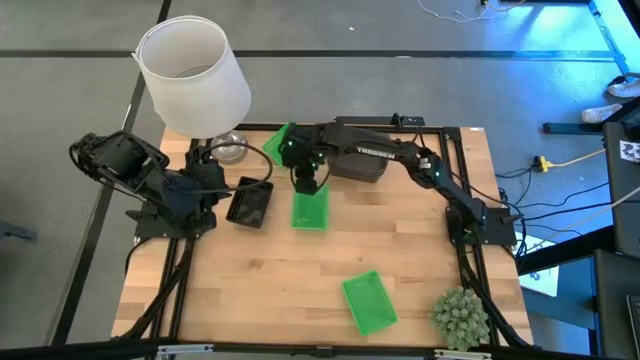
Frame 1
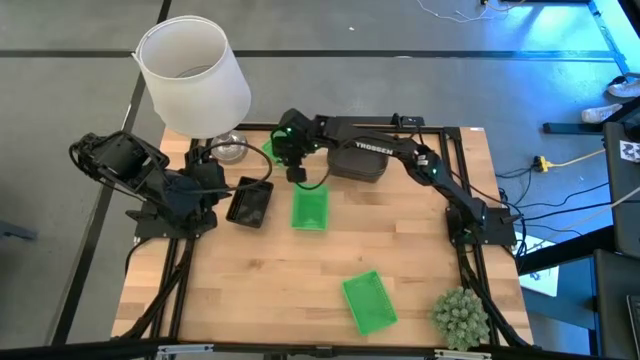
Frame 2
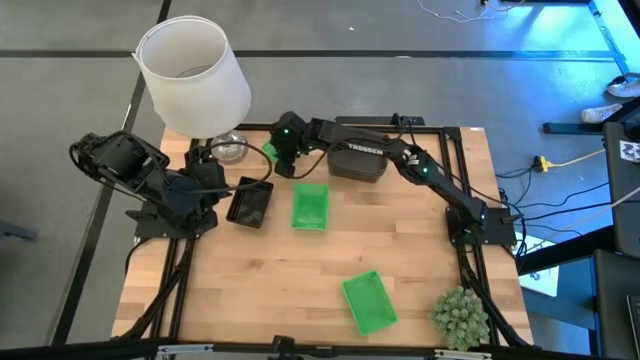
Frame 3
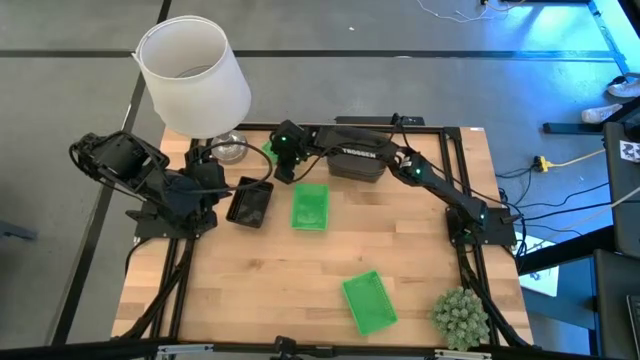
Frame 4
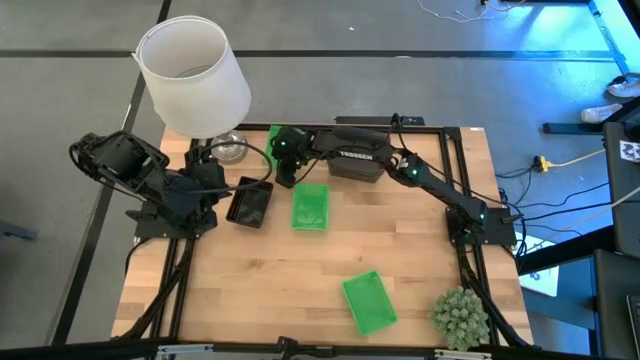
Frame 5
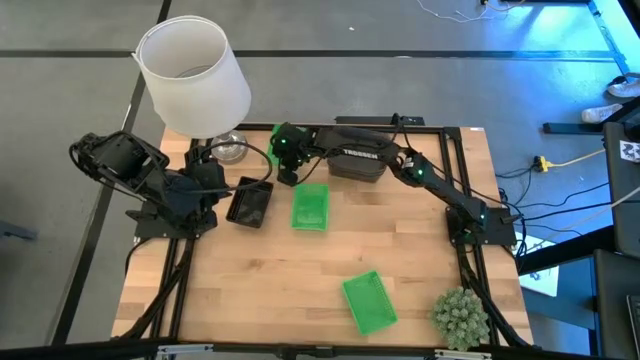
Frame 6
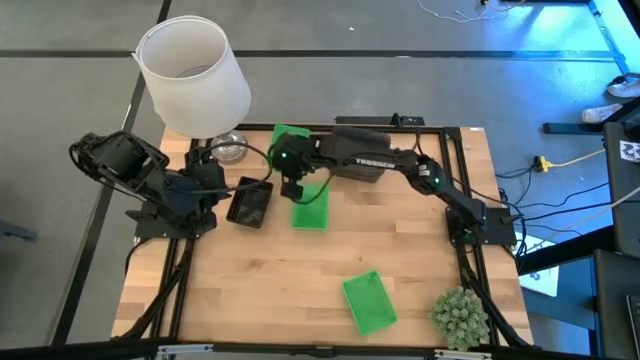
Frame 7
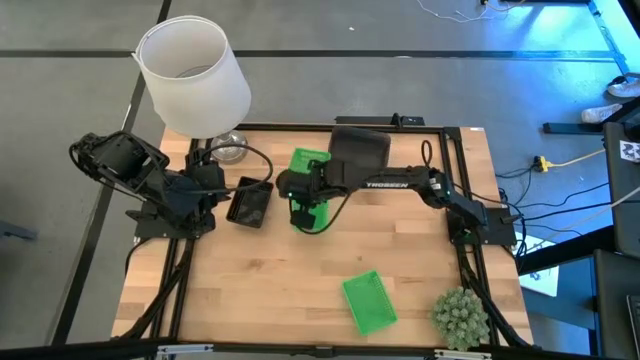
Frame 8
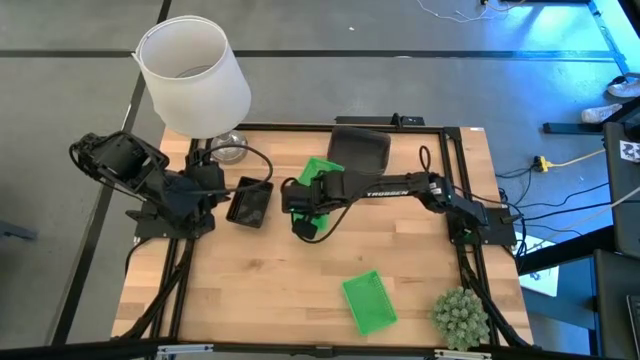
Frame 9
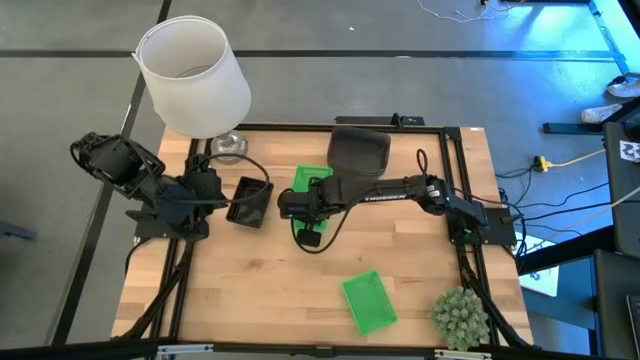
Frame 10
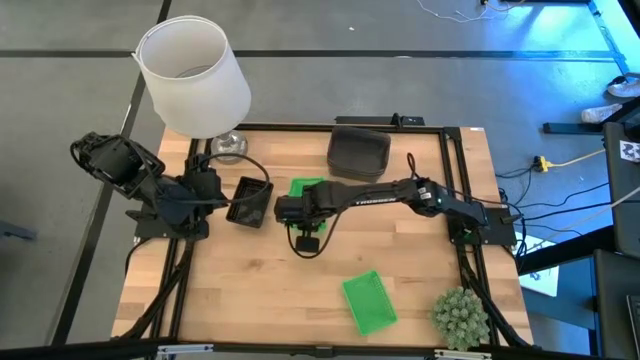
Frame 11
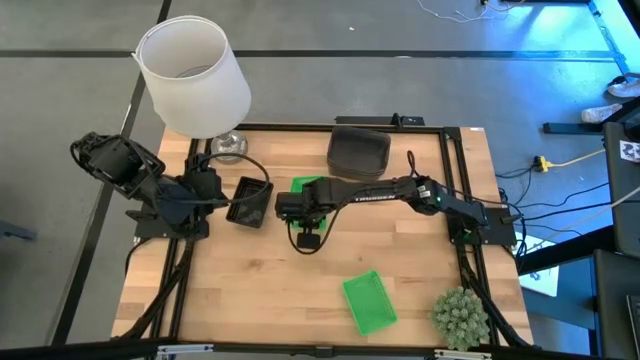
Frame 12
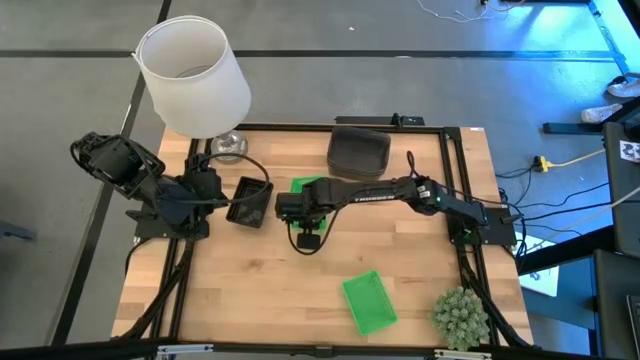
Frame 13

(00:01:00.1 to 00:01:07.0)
Stack the top green bin on the middle green bin

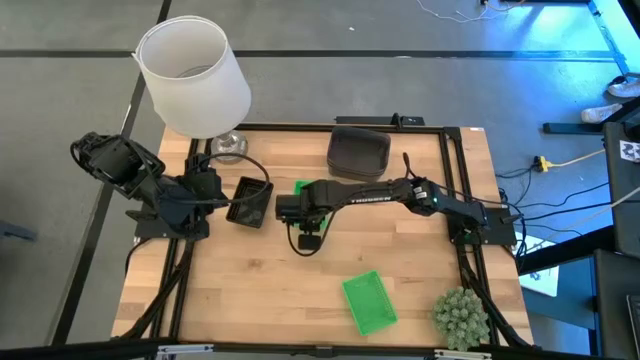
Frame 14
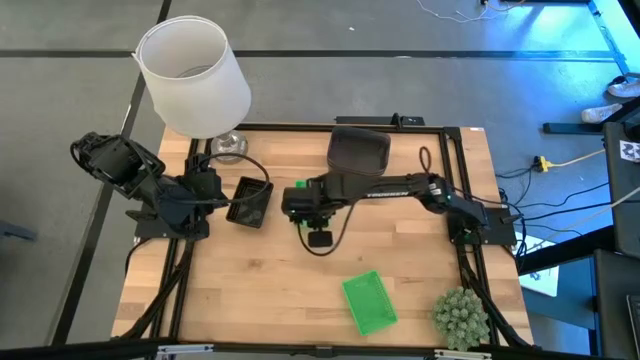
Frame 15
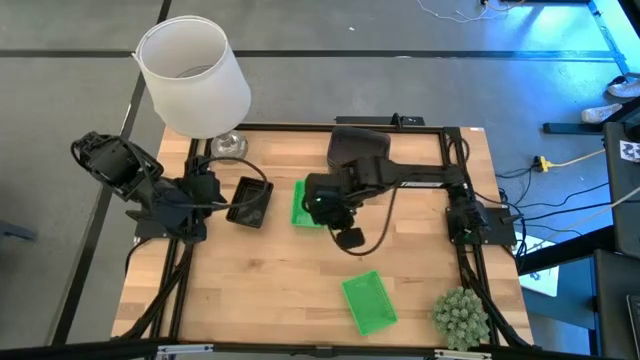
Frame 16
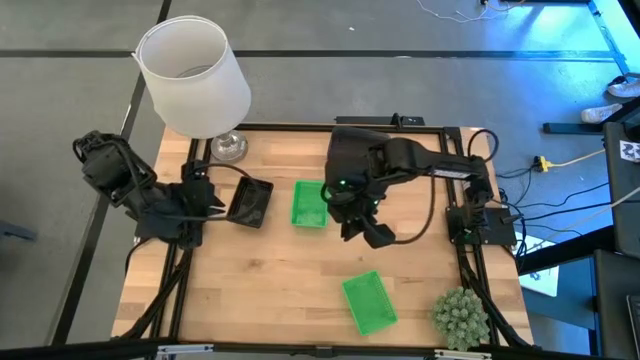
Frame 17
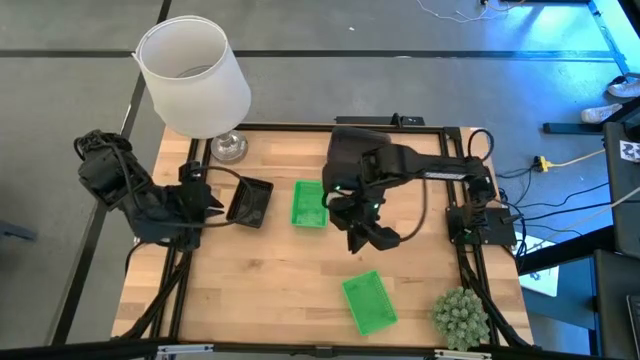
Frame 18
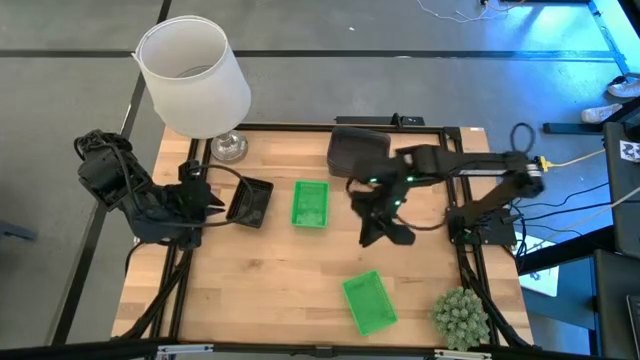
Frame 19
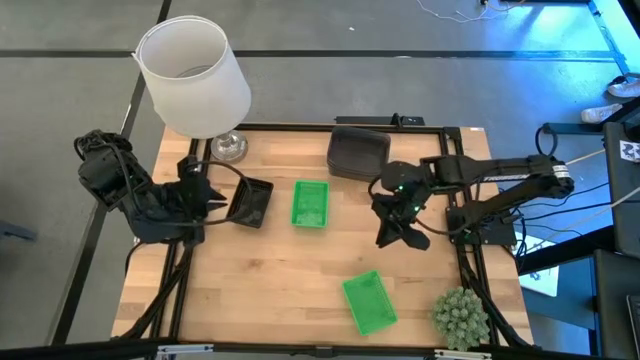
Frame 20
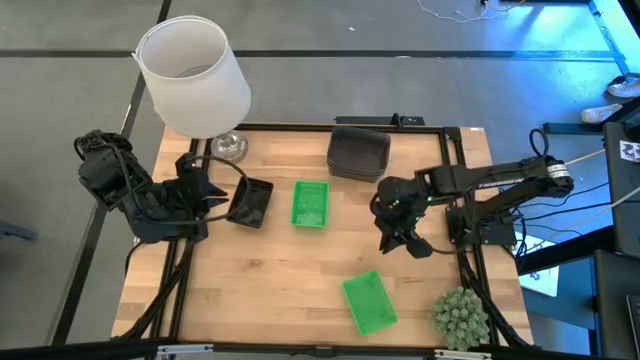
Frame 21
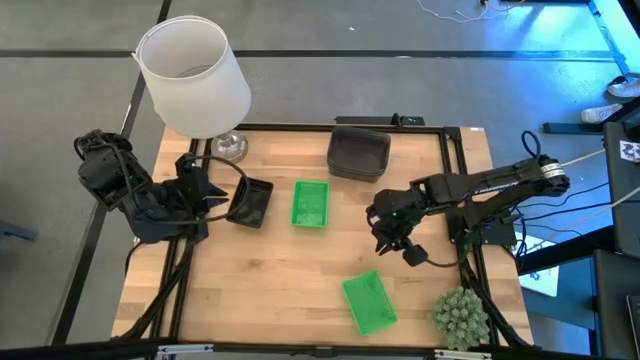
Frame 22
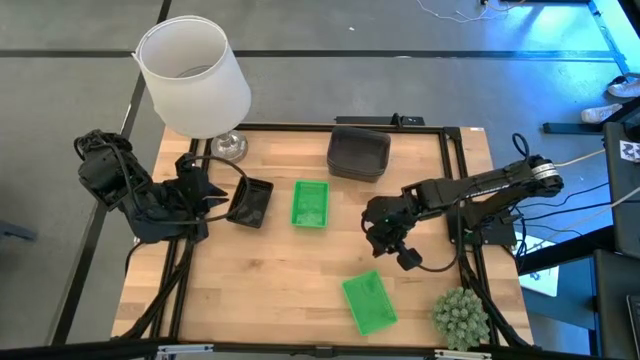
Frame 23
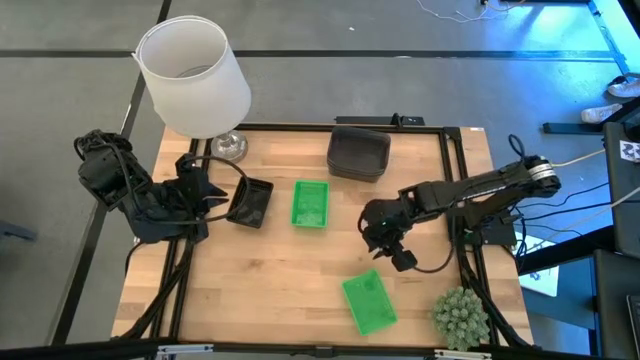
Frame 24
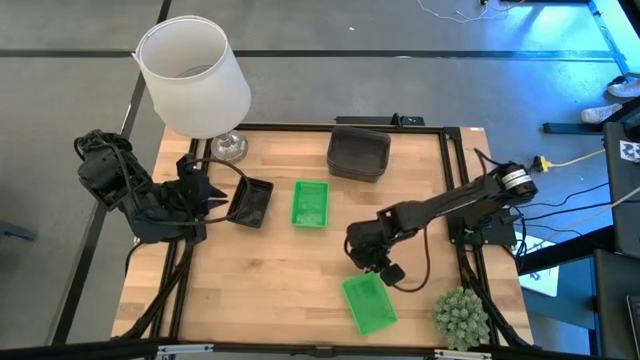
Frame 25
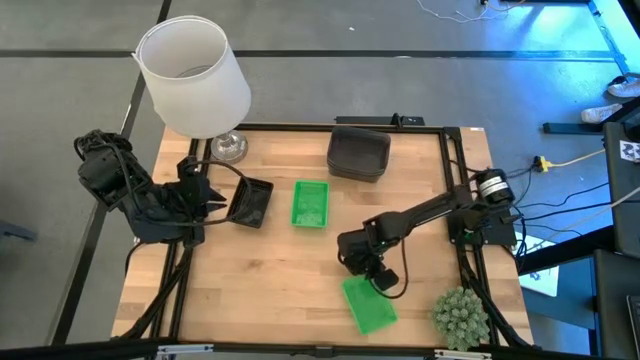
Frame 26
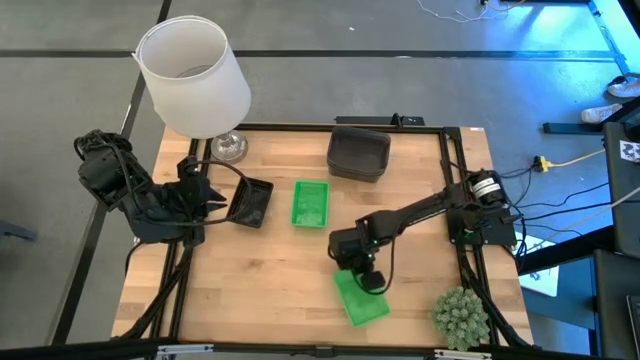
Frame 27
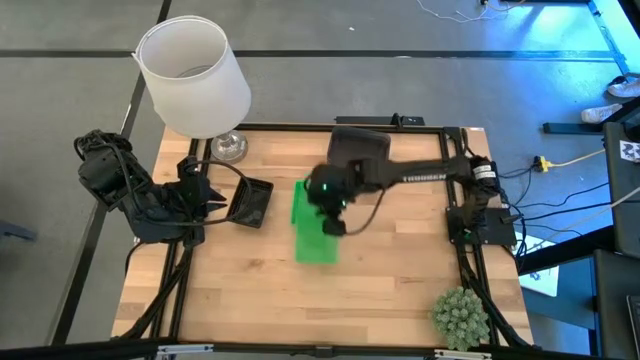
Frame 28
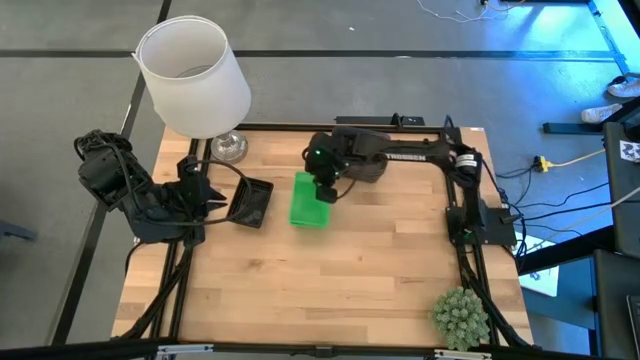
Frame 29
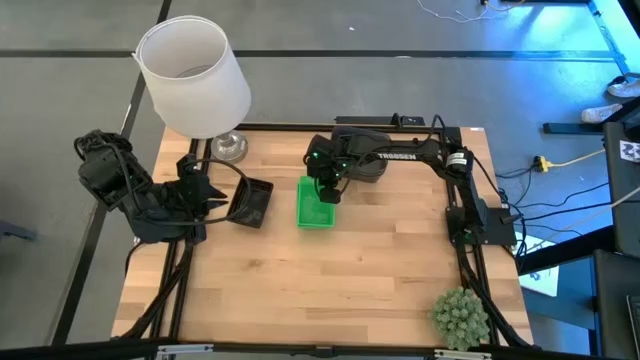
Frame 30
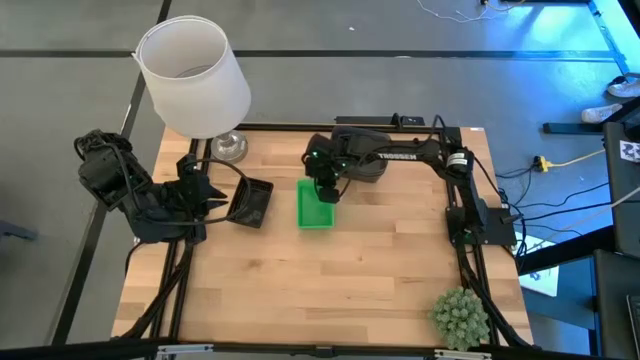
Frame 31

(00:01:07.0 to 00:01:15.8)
Stack the bottom green bin on the top green bin

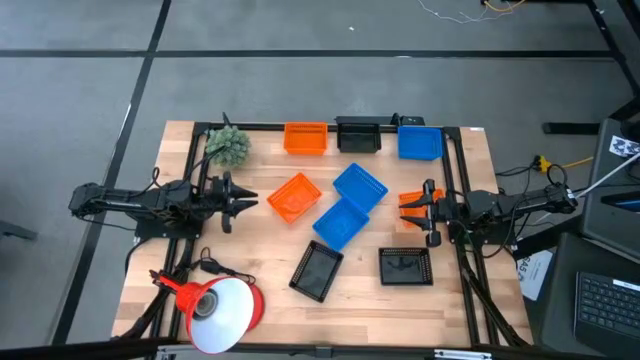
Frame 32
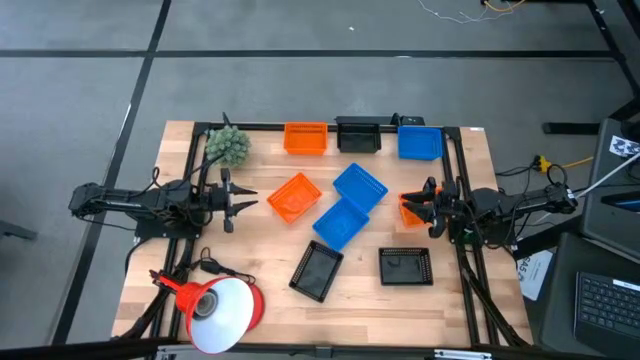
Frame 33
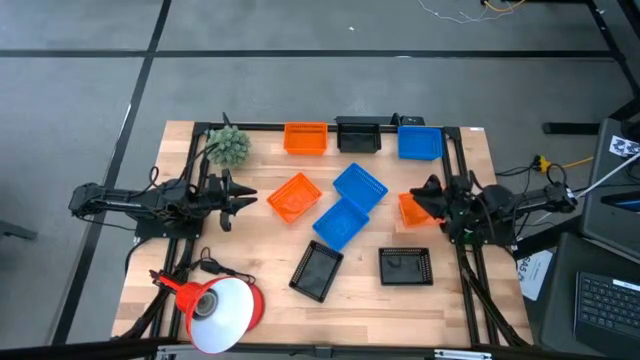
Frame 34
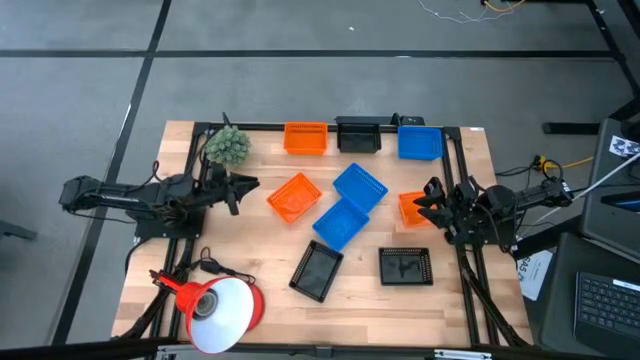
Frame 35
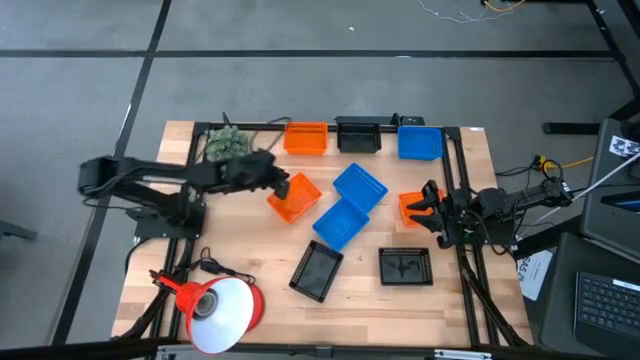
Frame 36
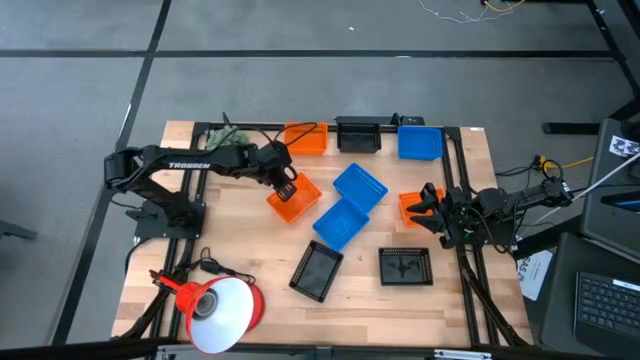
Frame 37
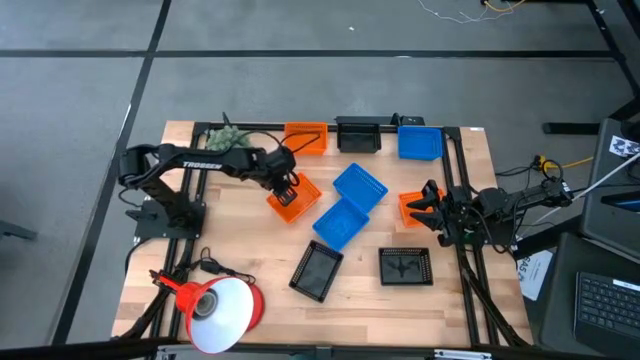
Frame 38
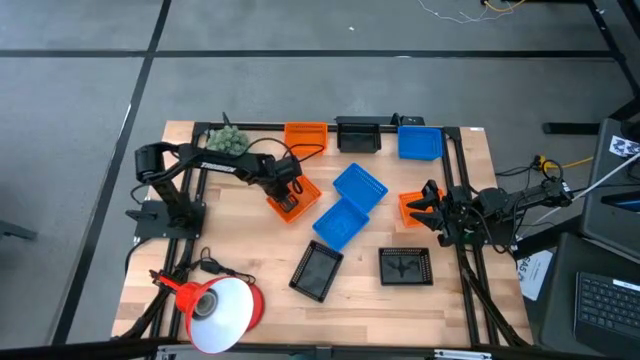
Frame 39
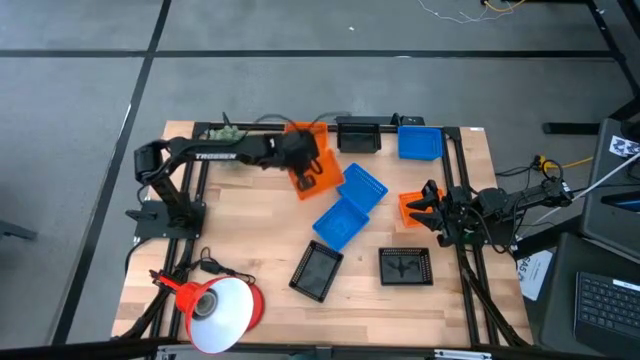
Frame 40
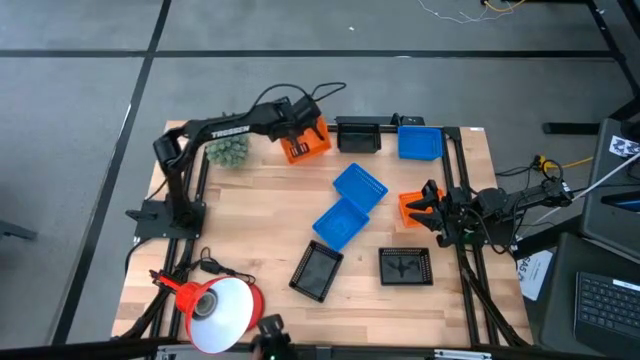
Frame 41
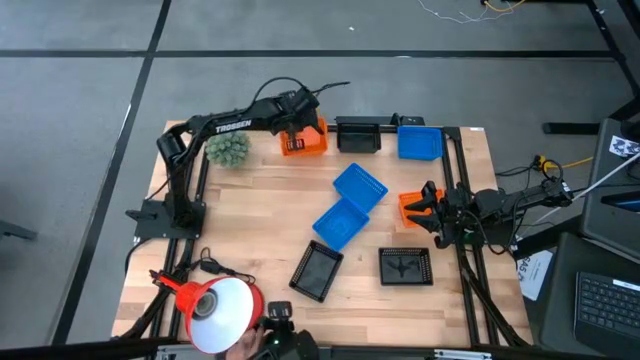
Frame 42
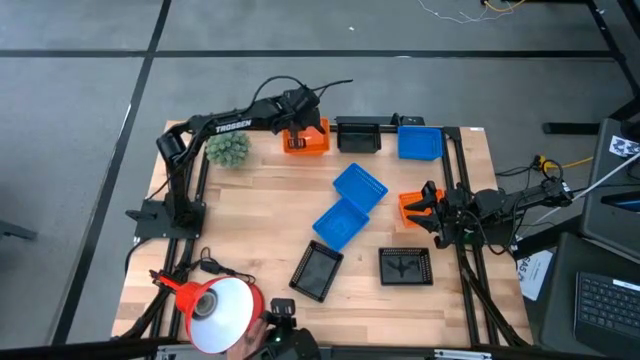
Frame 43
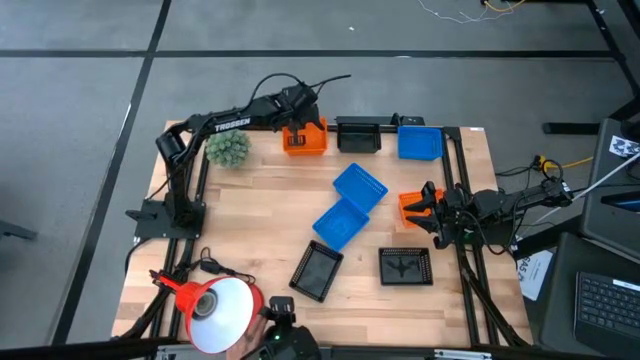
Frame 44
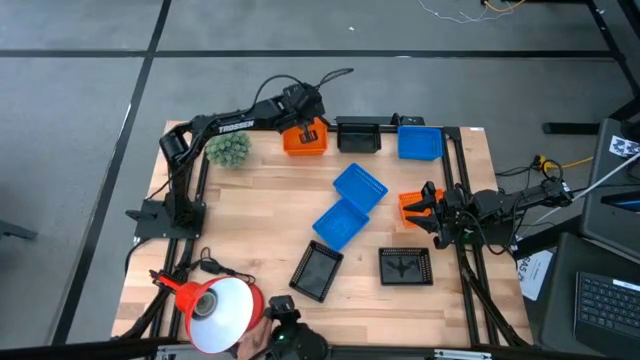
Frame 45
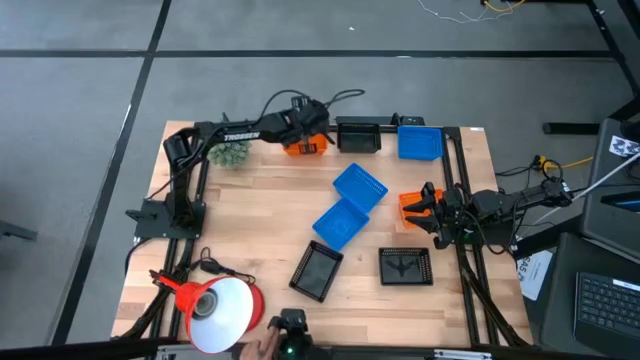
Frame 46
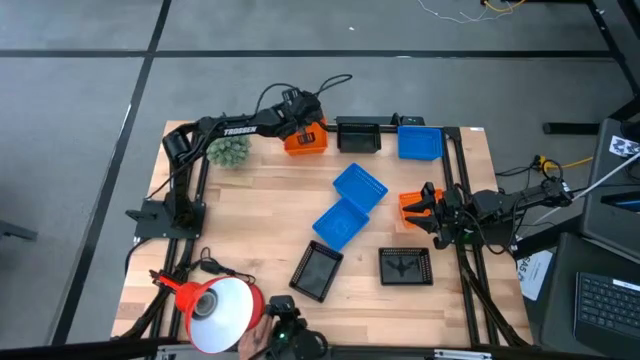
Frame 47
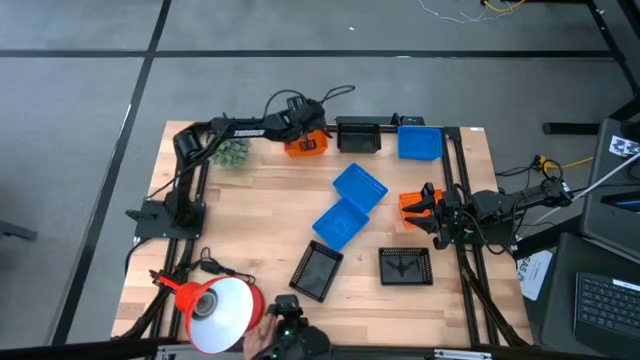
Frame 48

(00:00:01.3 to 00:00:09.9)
Stack the bottom left orange bin on the top left orange bin
